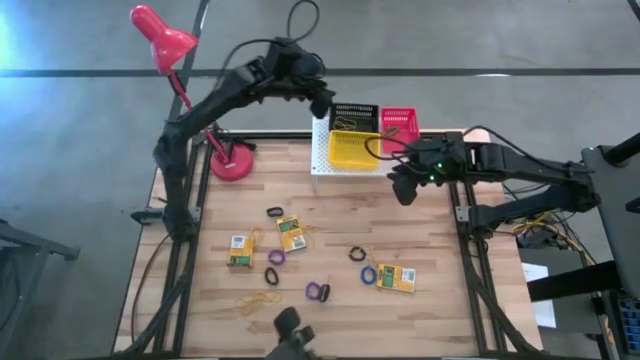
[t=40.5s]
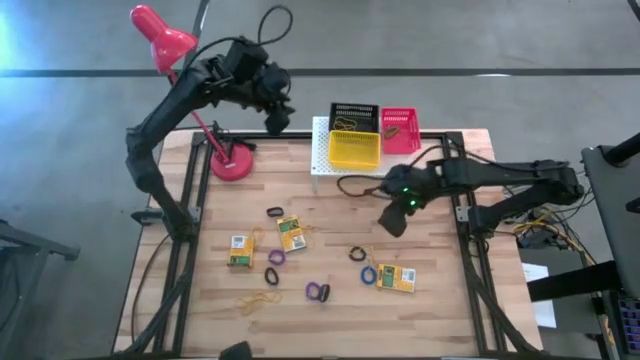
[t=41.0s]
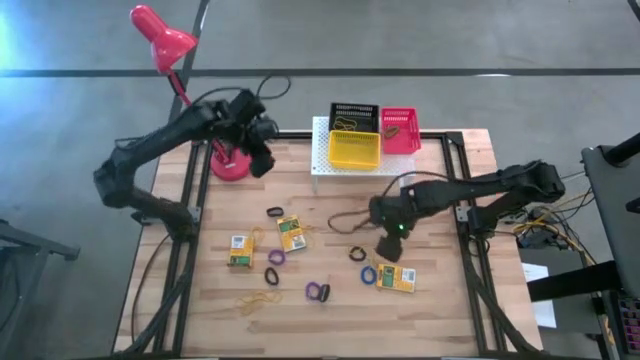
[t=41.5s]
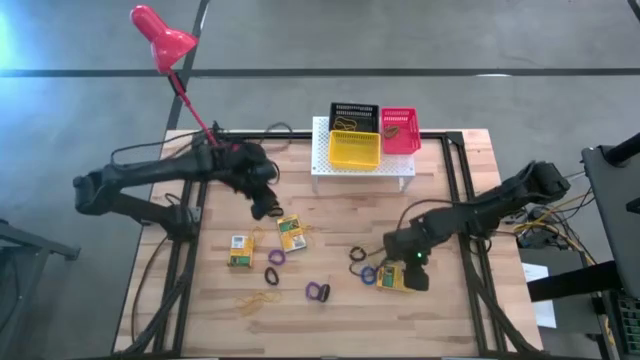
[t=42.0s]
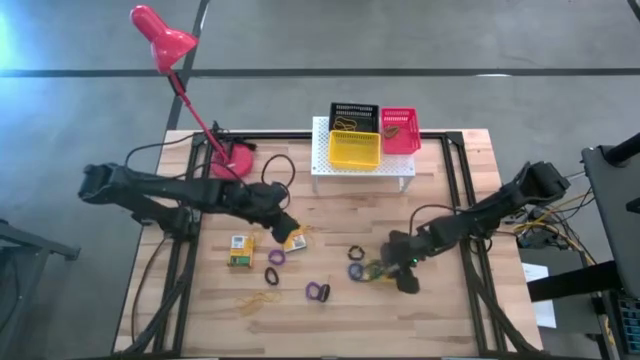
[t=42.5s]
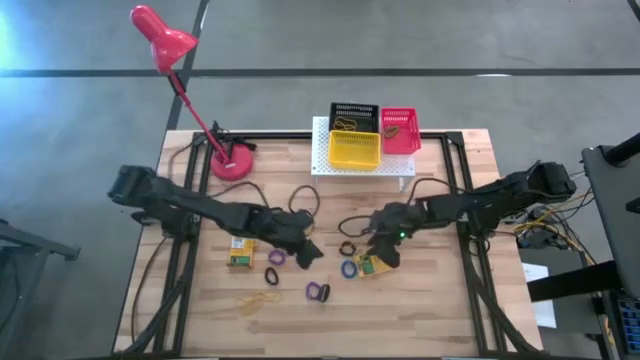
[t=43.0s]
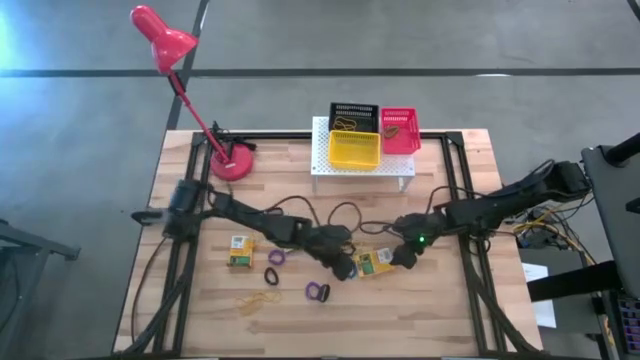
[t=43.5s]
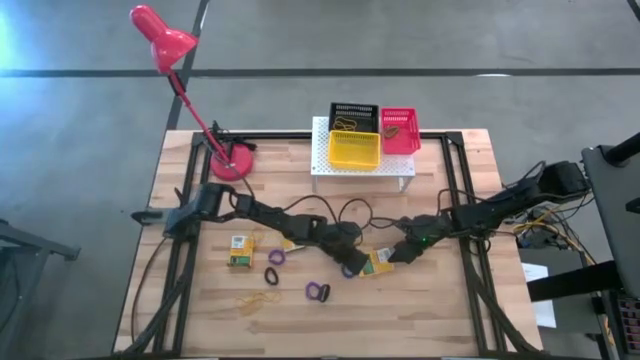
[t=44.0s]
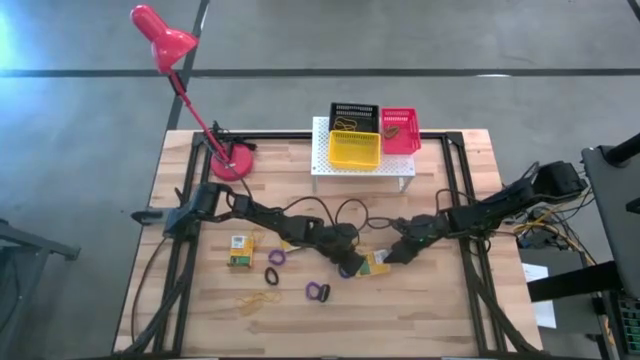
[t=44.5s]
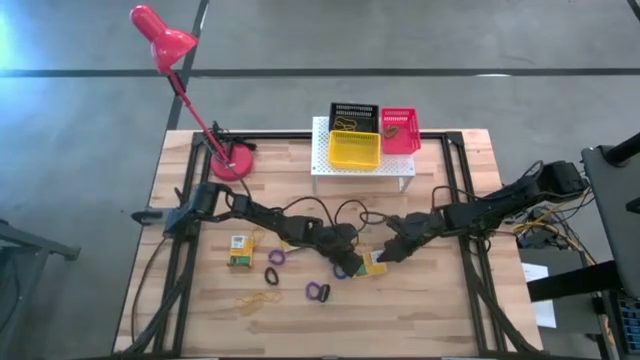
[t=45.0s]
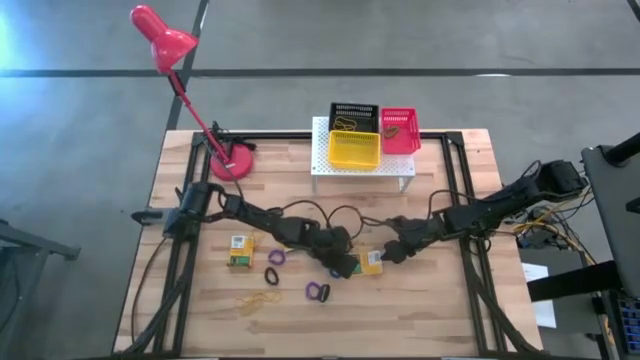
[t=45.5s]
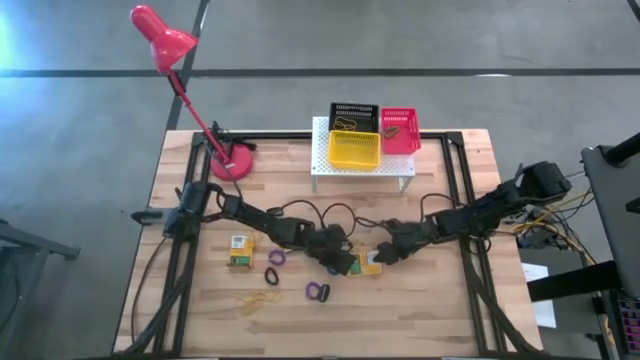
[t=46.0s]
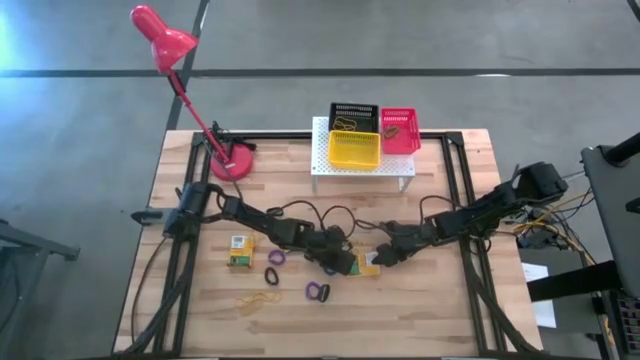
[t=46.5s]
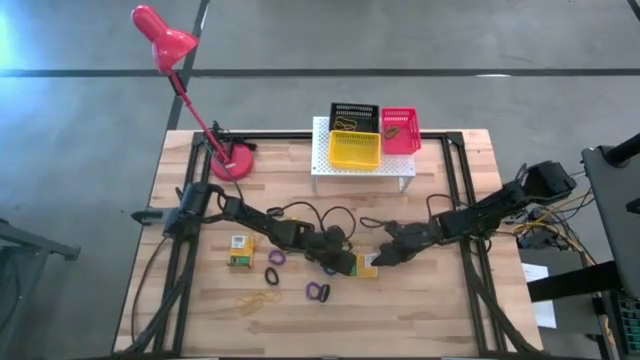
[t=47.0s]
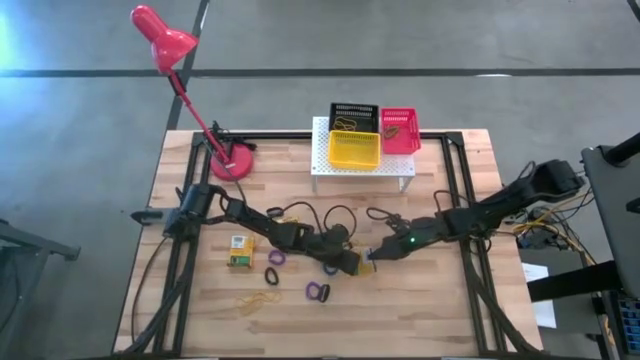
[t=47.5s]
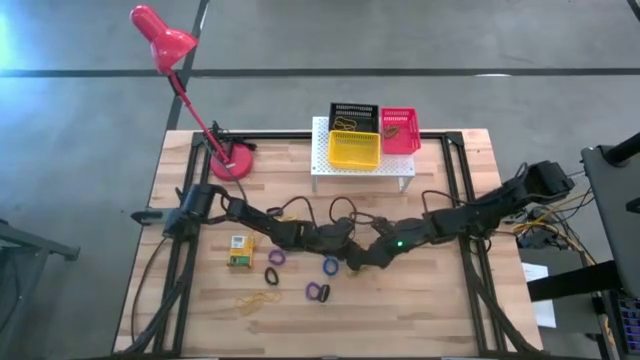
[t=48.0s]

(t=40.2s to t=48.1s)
Task: Pick & Place Office Desk Supplies
Put the yellow crayon box in the yellow bin on the shelf

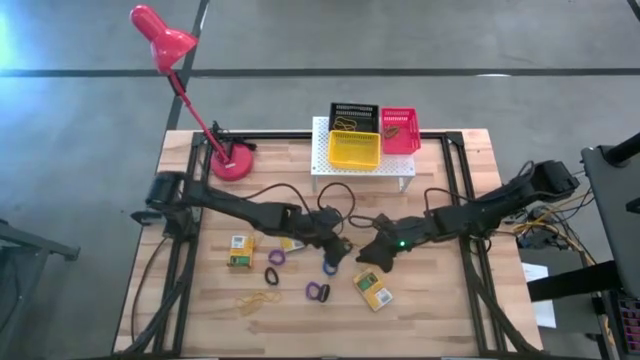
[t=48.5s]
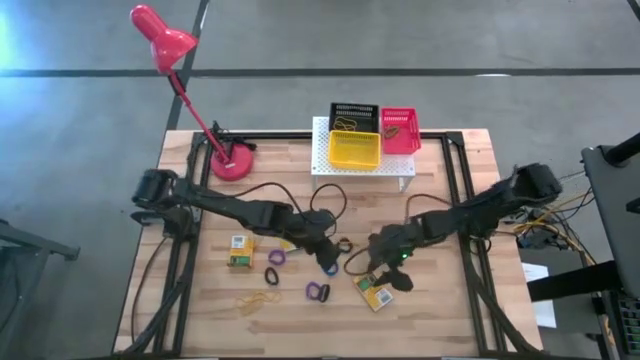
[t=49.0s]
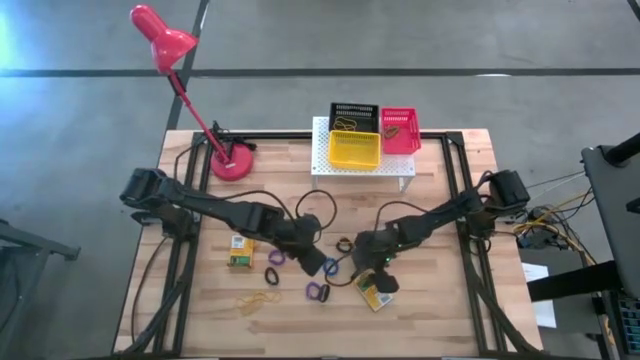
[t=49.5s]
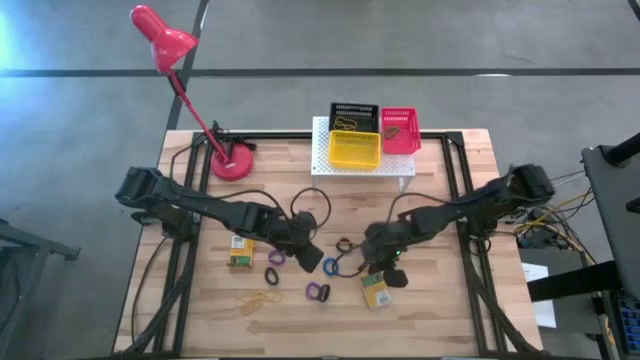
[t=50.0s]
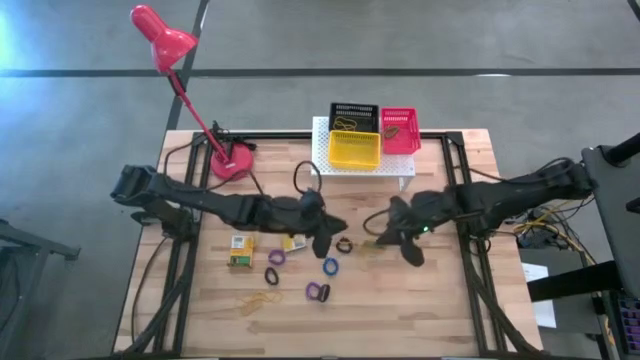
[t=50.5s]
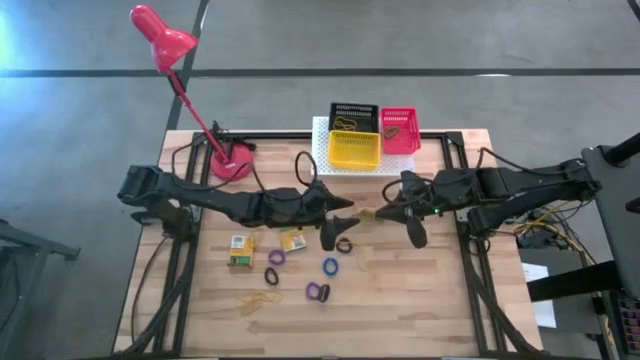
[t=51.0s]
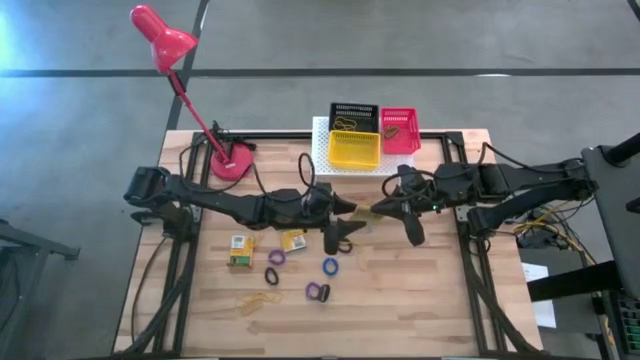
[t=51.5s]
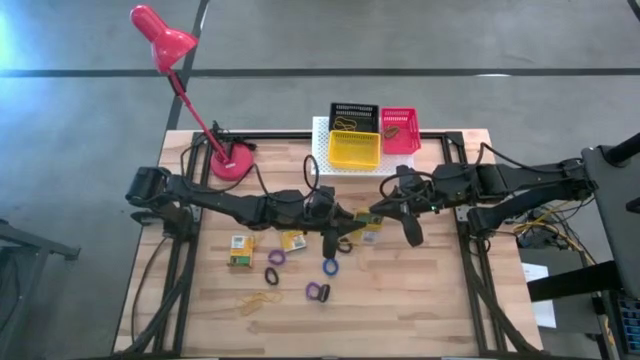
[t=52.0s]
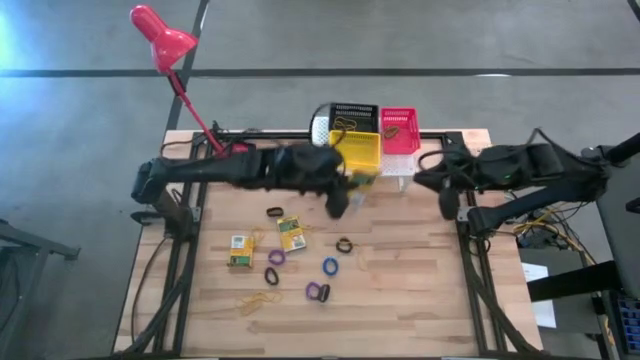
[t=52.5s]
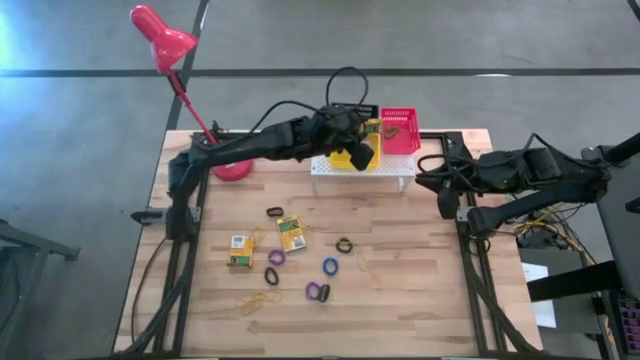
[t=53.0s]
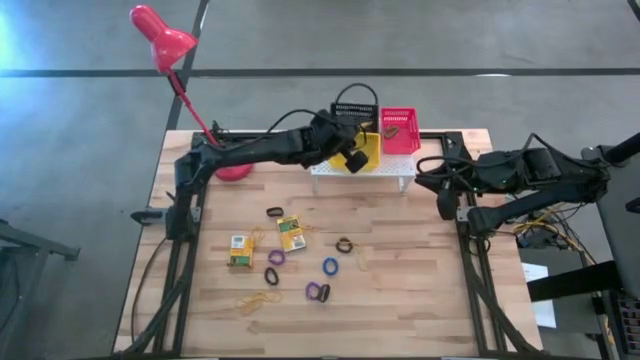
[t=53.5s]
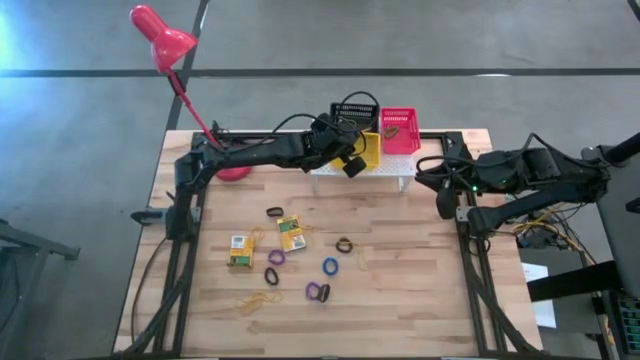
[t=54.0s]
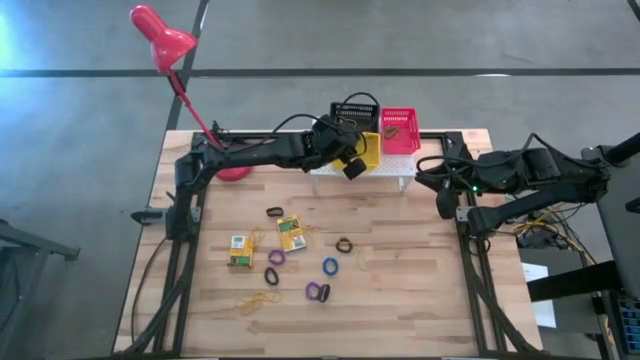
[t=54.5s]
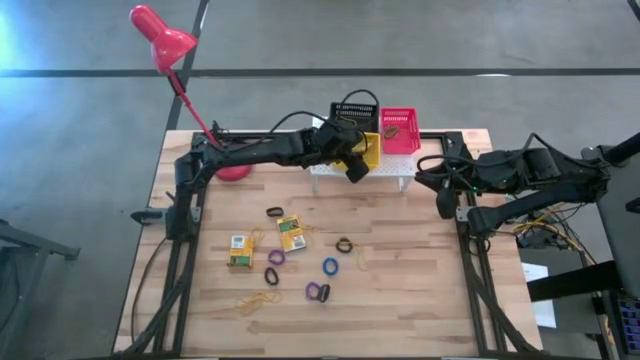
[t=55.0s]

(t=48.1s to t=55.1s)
Put the yellow crayon box in the yellow bin on the shelf

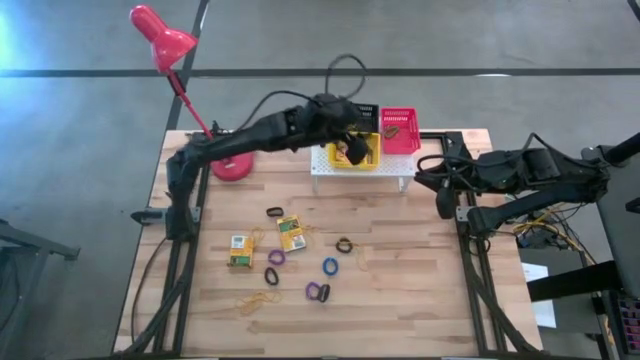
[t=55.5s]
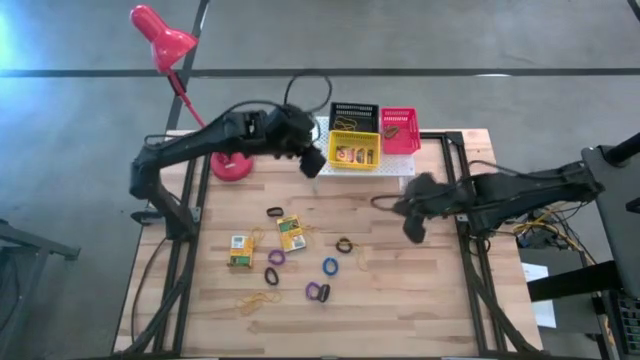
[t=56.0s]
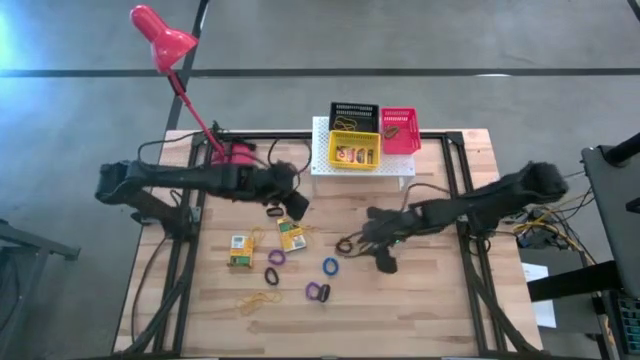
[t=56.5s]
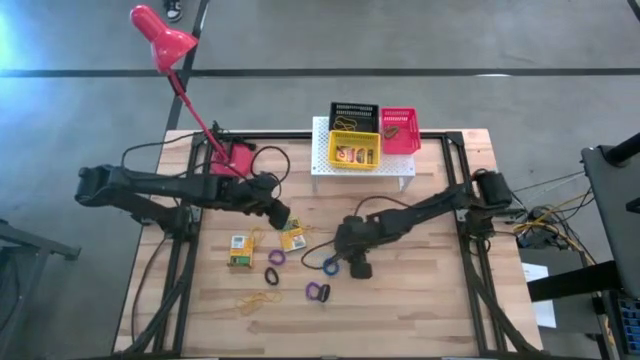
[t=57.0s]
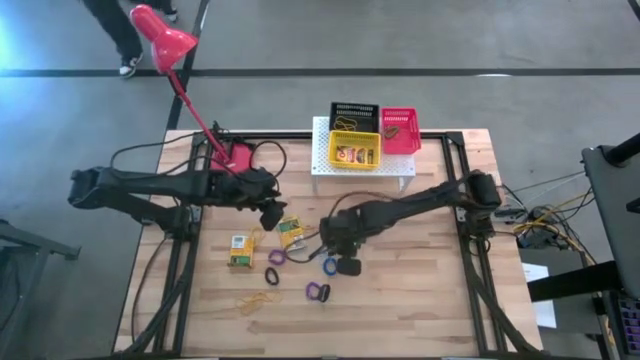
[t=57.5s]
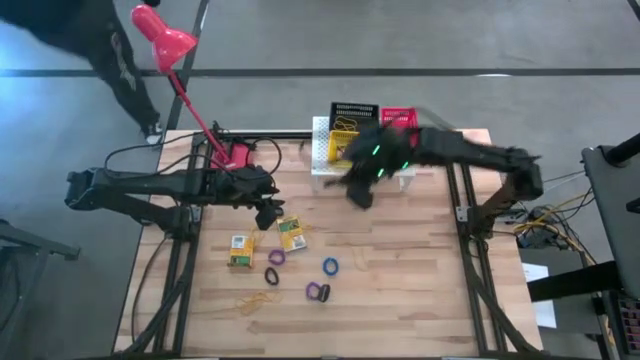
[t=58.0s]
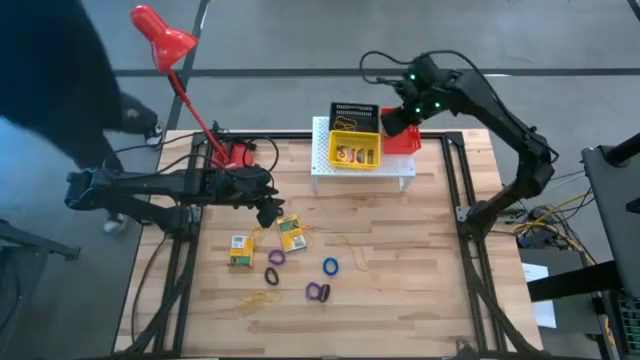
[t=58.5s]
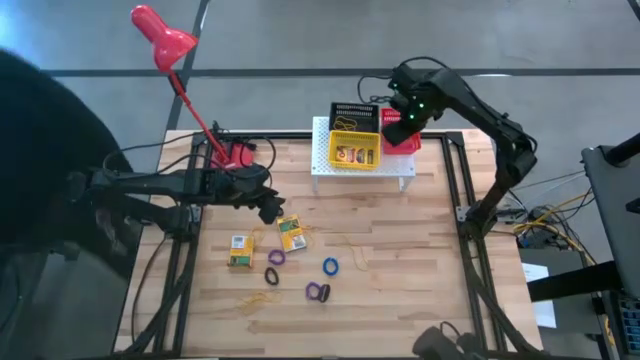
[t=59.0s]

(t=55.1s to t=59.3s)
Put the black spring keychain in the red bin on the shelf

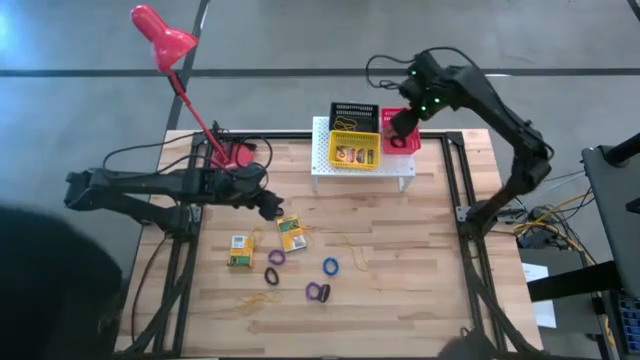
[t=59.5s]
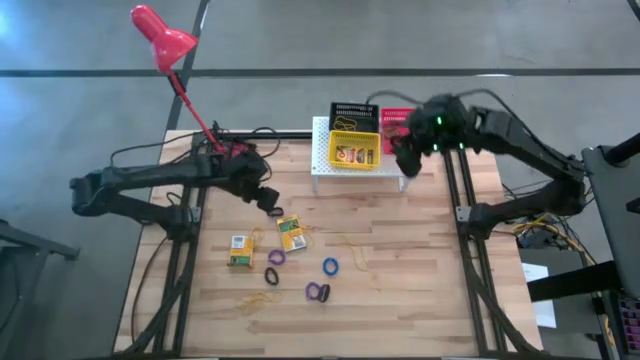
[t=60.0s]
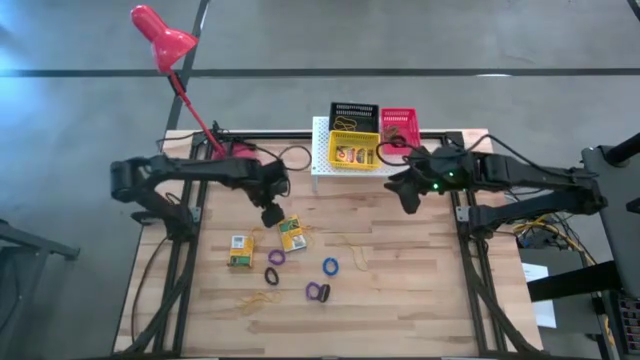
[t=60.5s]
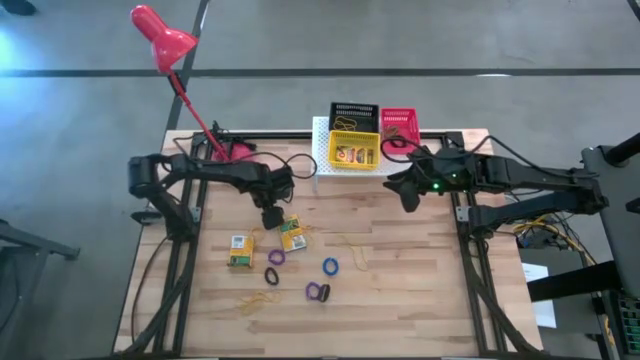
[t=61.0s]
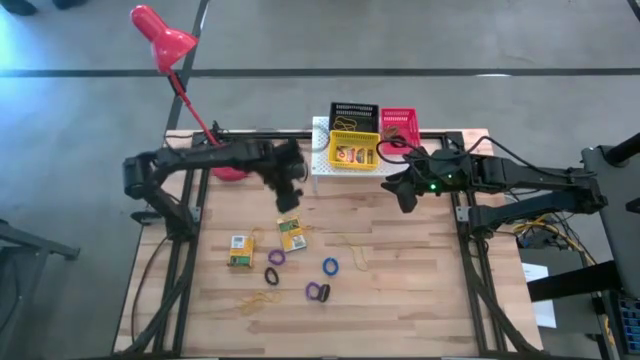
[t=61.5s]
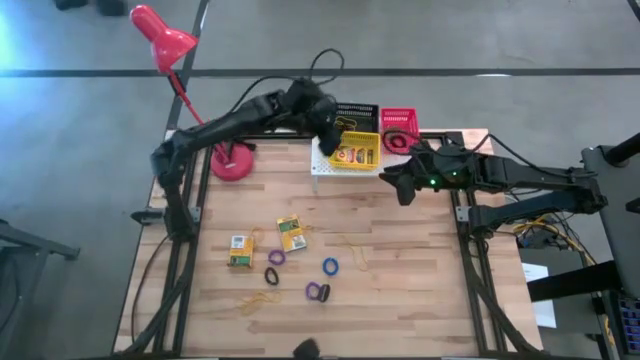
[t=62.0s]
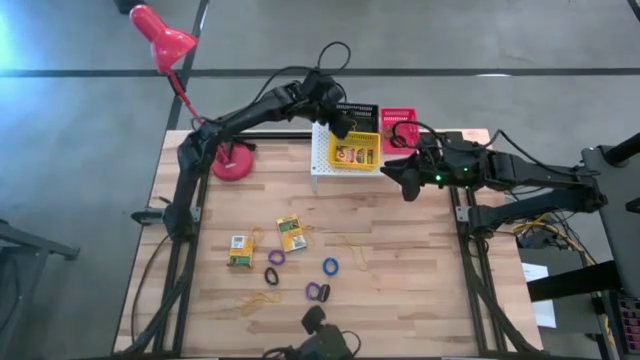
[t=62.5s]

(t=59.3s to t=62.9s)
Put the yellow crayon box in the yellow bin on the shelf
